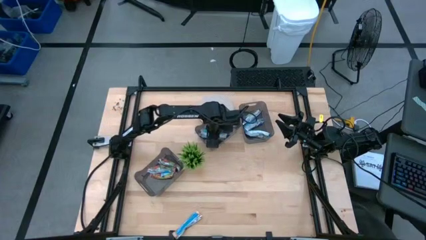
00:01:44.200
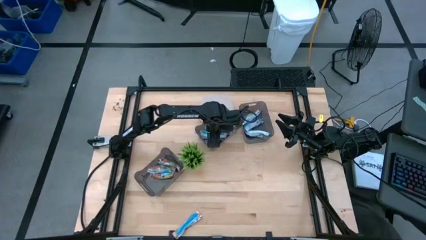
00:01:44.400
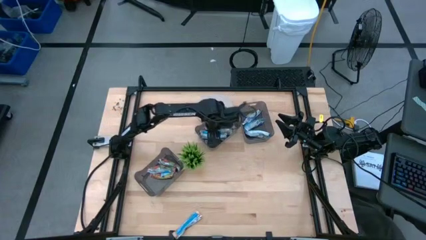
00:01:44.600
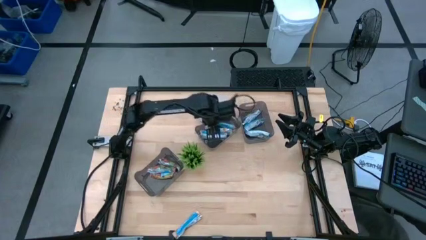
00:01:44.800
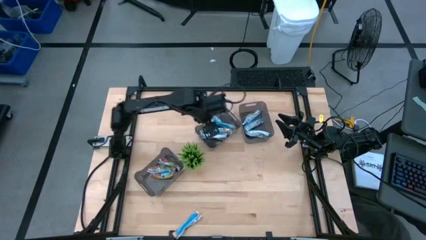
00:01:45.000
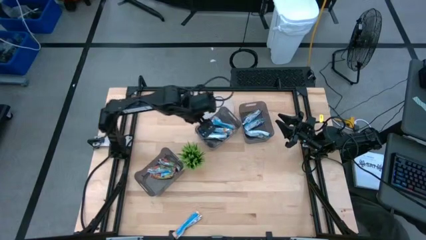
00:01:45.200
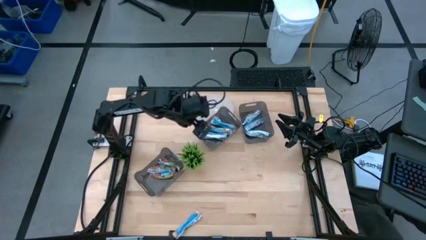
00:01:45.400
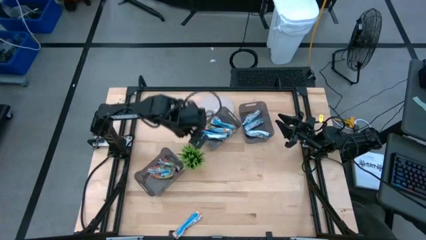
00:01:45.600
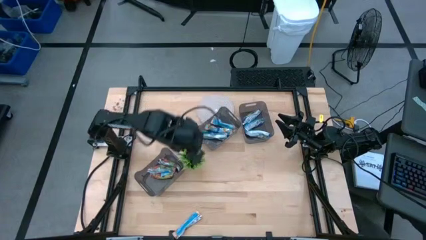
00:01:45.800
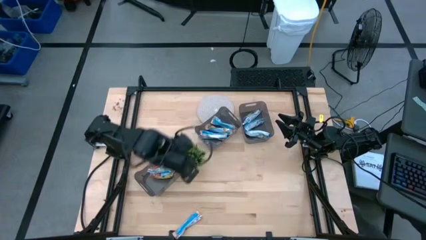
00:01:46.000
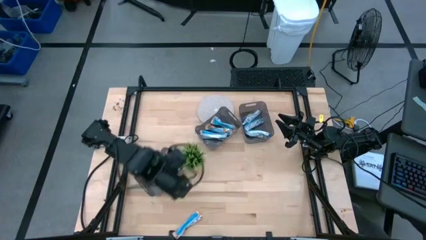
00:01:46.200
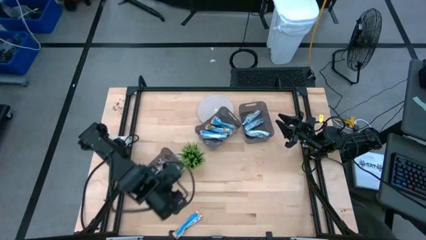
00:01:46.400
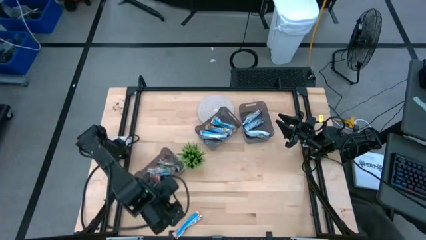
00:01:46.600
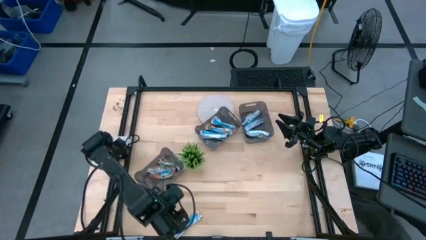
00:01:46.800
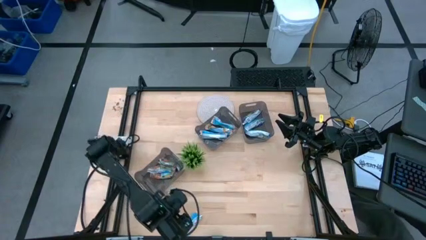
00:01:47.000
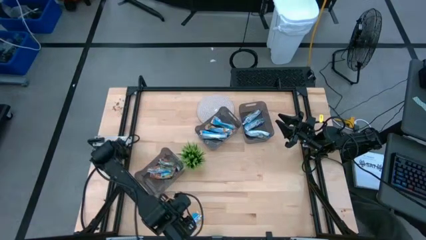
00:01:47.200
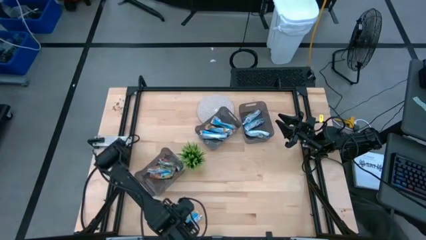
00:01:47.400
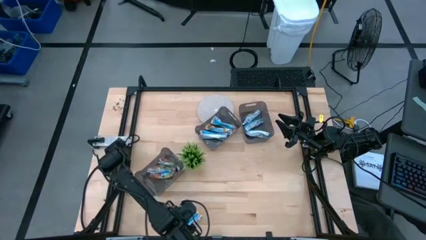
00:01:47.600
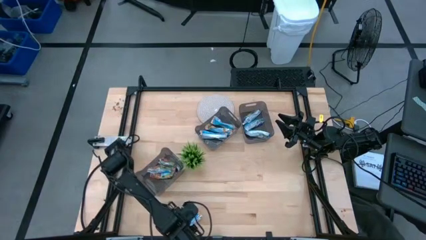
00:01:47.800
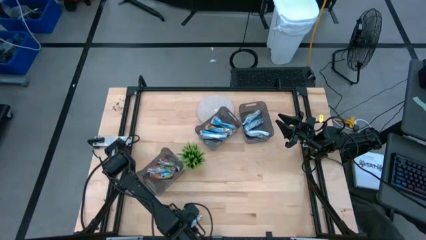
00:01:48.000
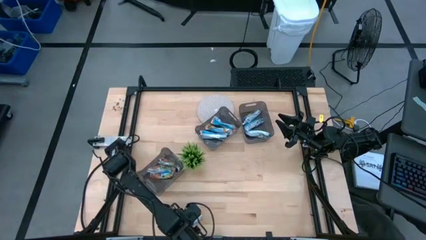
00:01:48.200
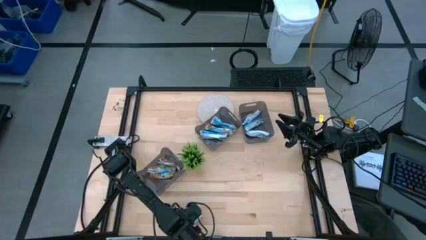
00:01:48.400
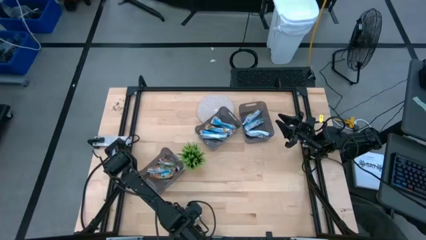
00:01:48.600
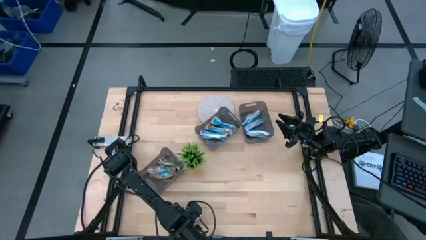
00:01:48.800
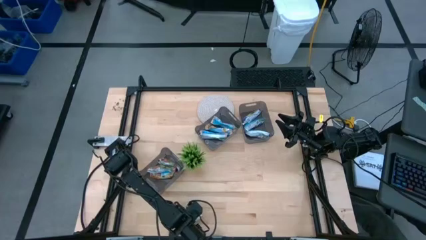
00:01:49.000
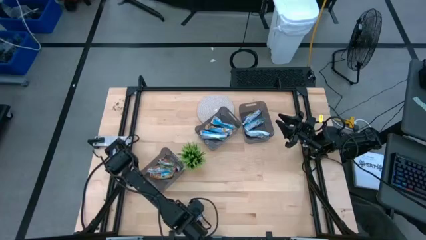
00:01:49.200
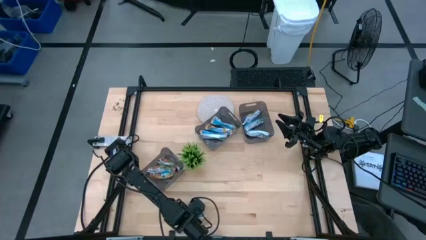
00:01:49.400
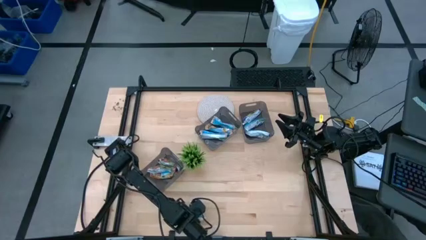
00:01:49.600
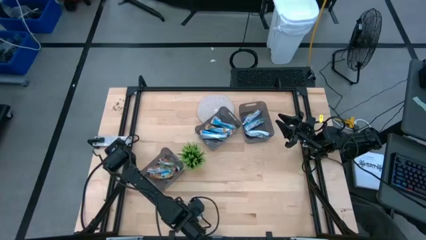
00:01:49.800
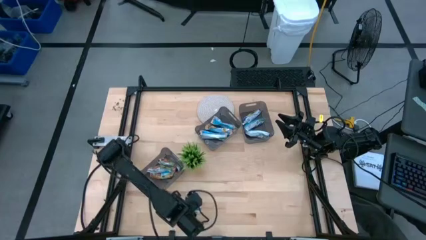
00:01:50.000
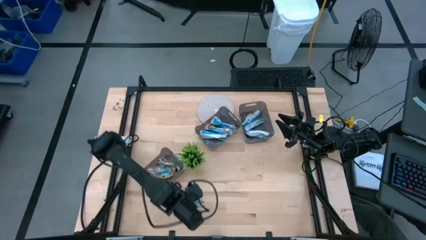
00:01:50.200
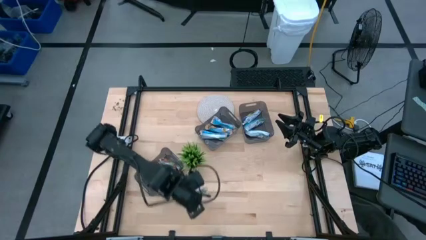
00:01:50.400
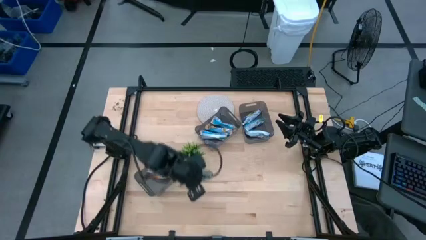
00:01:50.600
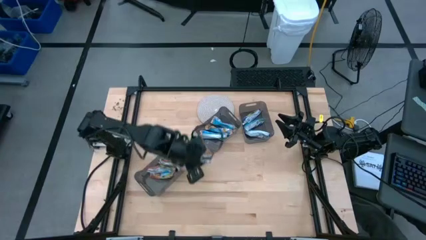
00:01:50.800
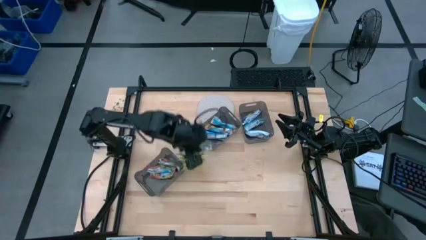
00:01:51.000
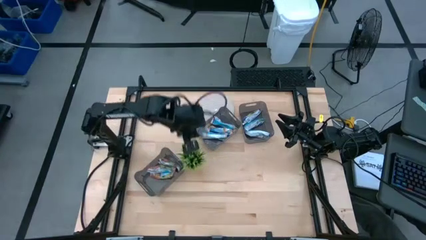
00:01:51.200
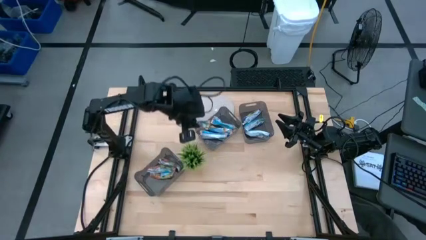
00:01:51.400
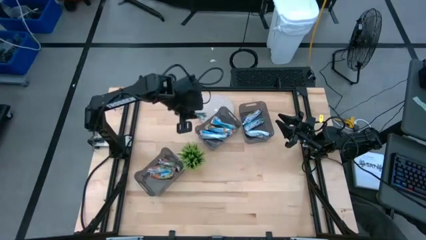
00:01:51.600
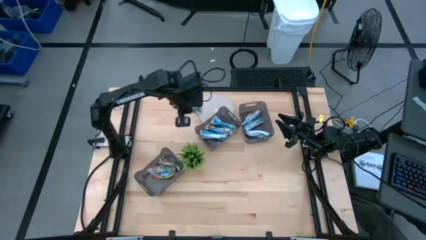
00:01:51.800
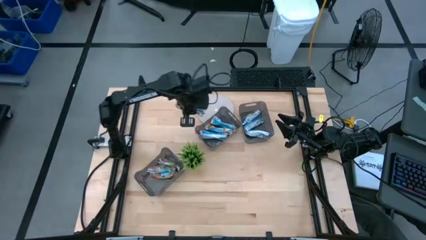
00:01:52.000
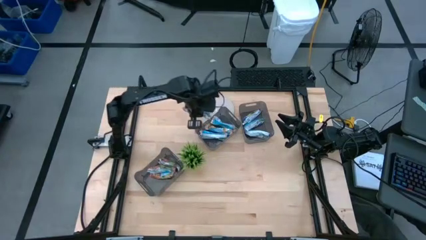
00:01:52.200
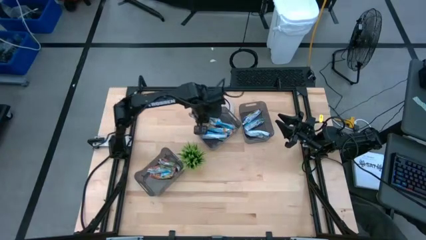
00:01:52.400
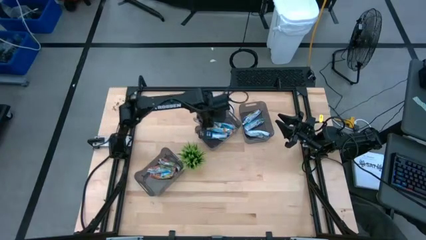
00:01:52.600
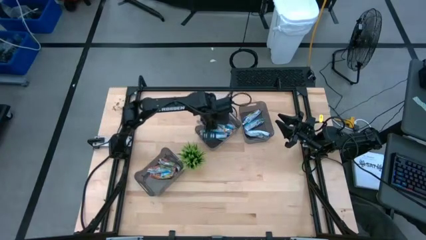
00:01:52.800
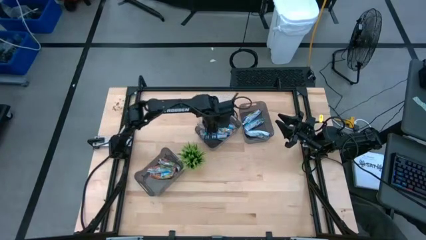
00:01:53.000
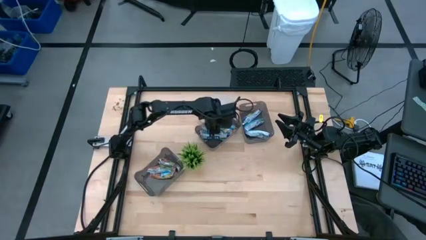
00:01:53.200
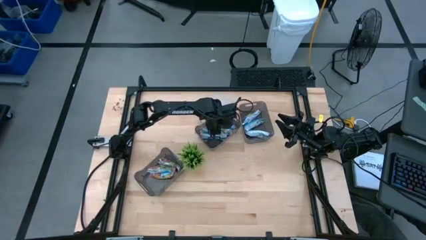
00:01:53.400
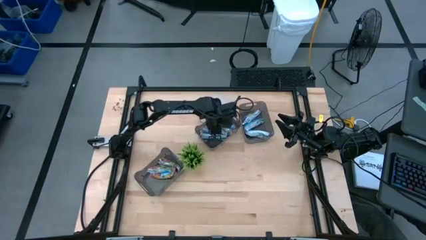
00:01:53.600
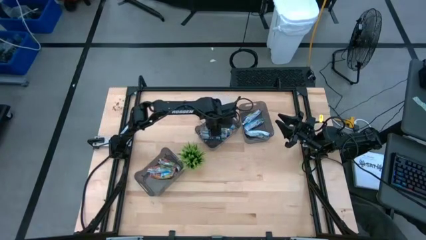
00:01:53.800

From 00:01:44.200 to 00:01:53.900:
Task: Pick and place Granola Bars by type
Put the yellow granola bar into the top left black bin

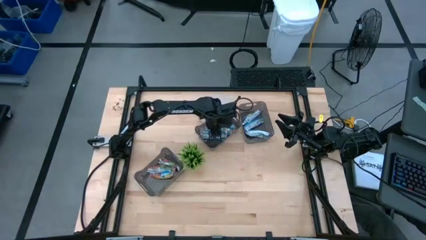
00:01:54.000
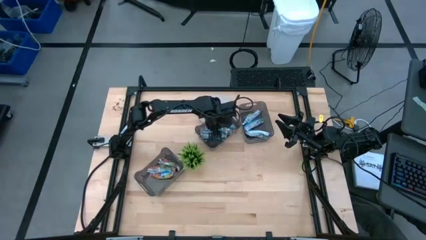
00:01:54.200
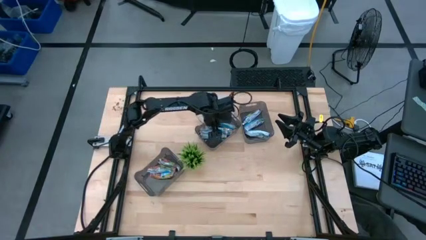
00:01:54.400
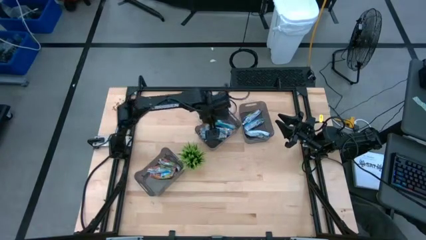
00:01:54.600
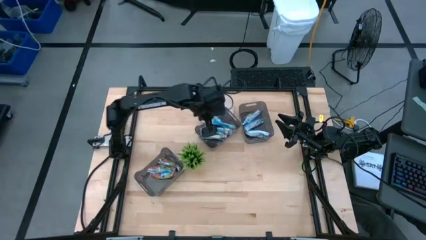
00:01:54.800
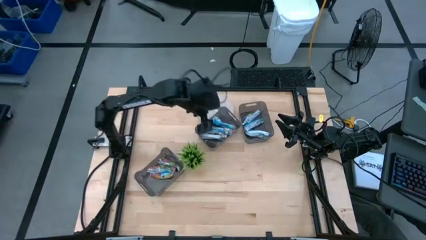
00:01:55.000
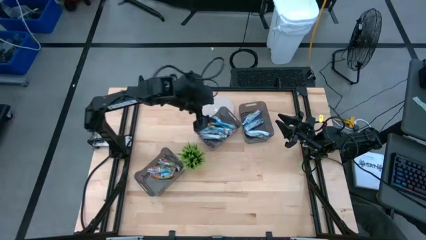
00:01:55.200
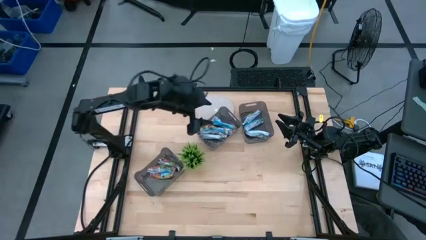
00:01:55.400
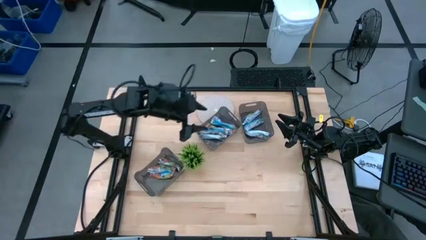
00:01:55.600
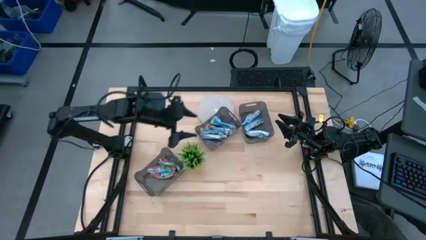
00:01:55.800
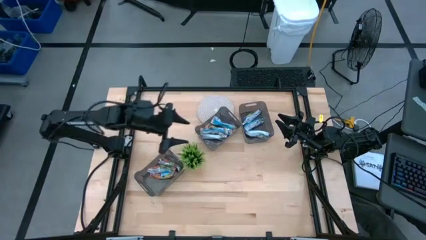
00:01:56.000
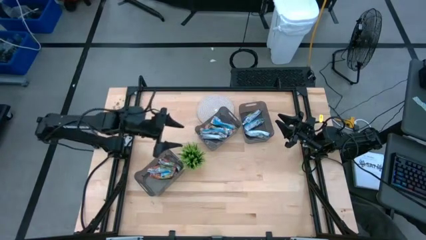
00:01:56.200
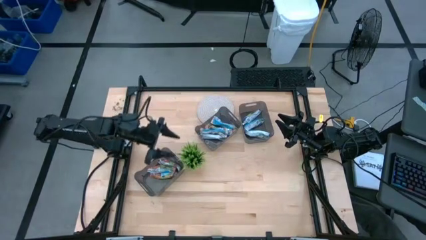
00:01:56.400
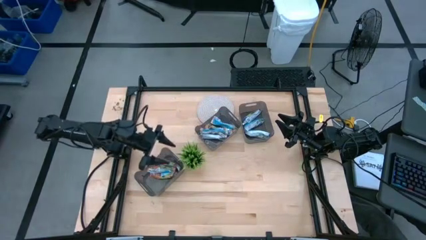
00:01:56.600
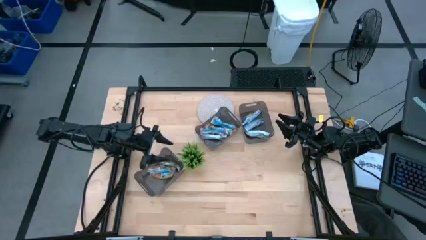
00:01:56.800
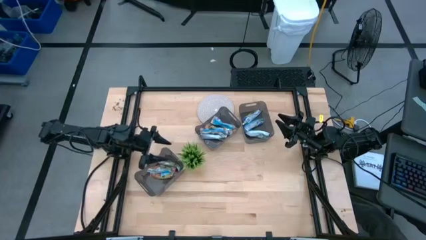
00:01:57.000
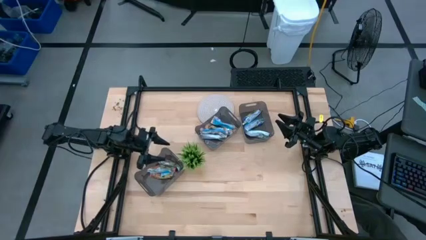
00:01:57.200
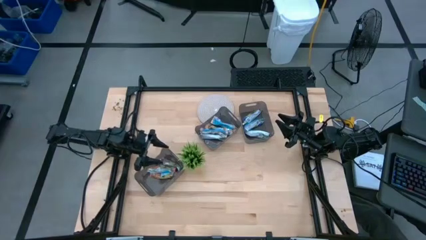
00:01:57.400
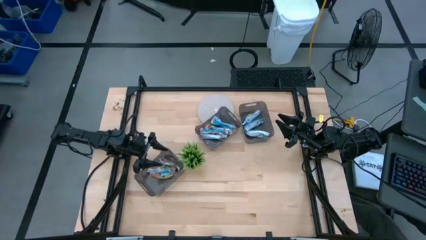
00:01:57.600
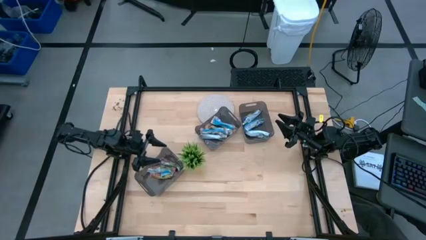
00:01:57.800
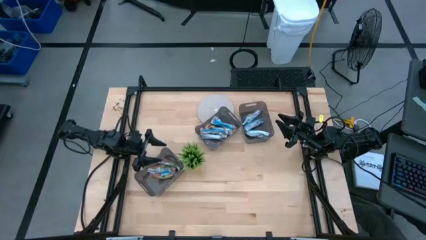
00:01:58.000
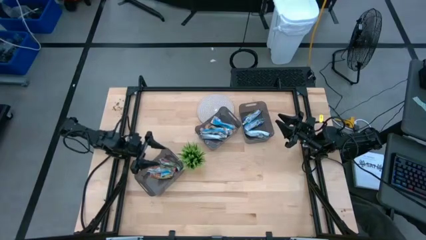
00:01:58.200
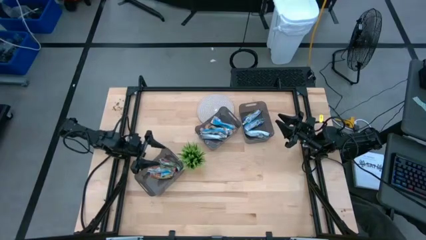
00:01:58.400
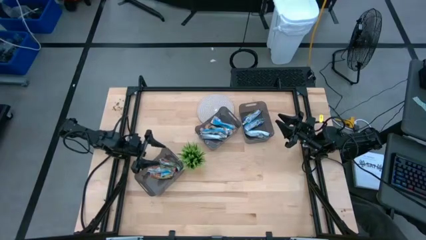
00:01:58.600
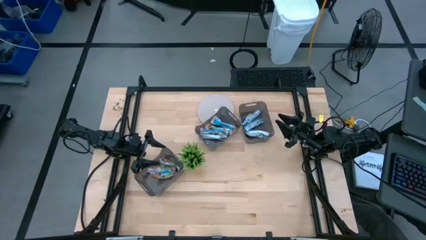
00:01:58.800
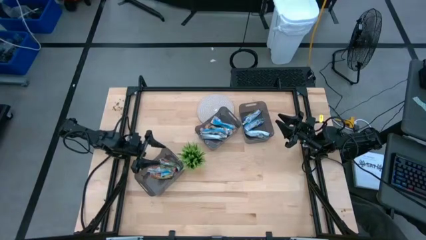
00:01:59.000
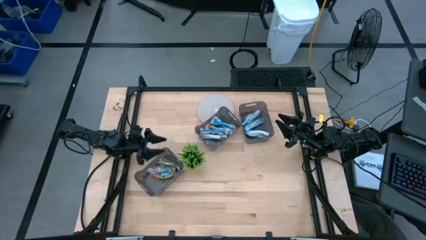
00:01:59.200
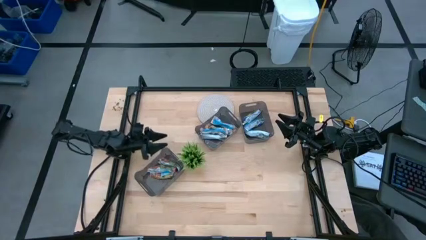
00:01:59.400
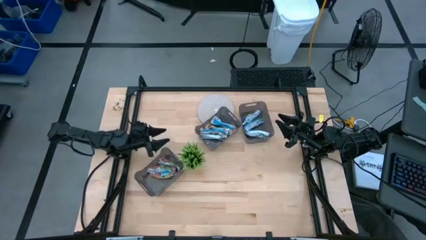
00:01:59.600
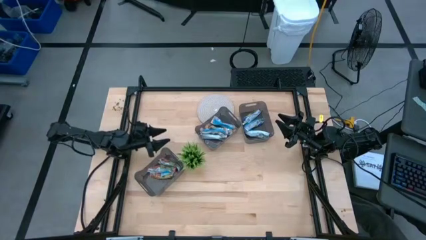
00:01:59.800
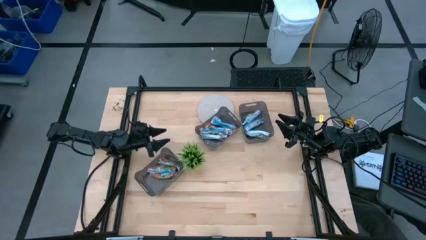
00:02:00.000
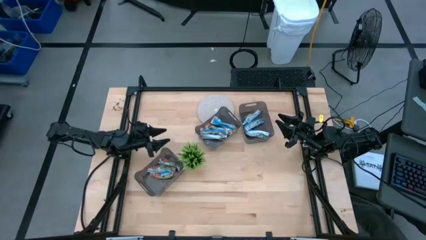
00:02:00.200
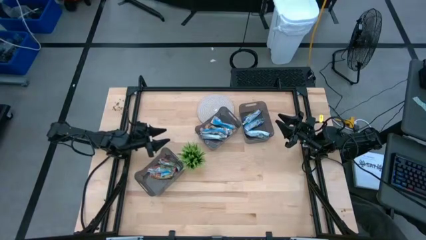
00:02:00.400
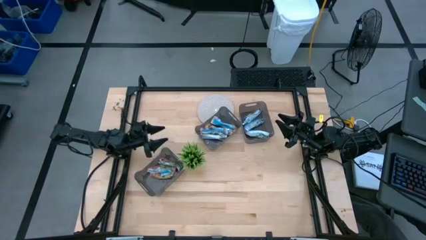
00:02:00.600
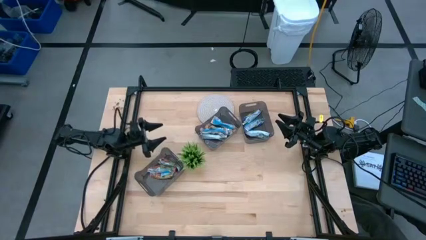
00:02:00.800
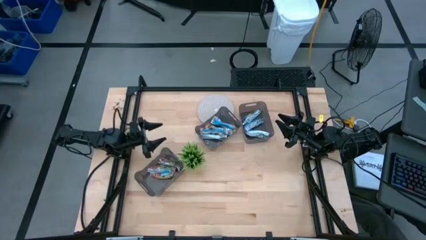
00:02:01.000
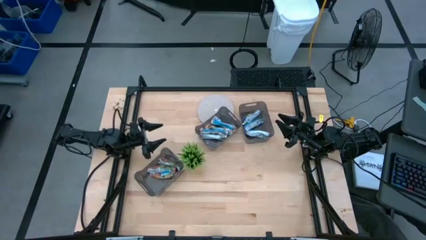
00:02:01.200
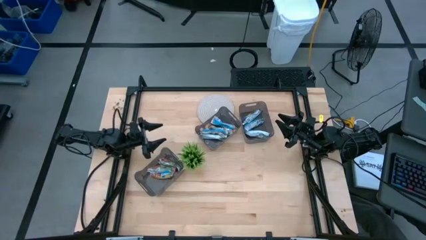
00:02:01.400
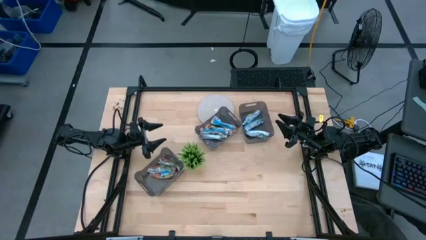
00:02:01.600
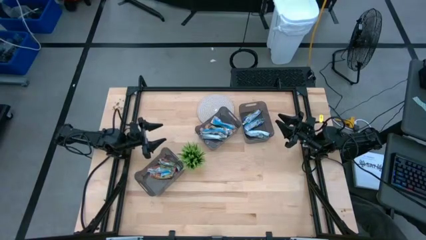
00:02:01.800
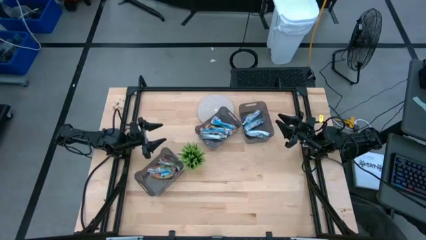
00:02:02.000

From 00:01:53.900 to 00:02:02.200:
Return to Home Position
